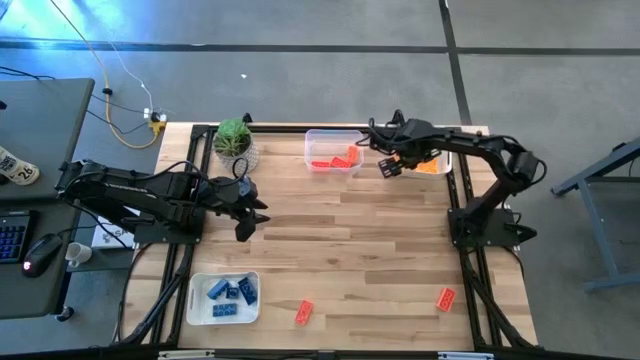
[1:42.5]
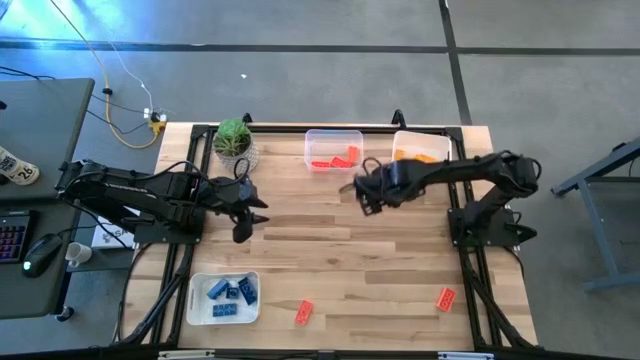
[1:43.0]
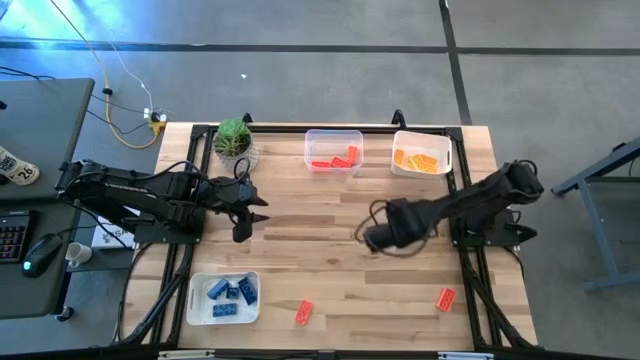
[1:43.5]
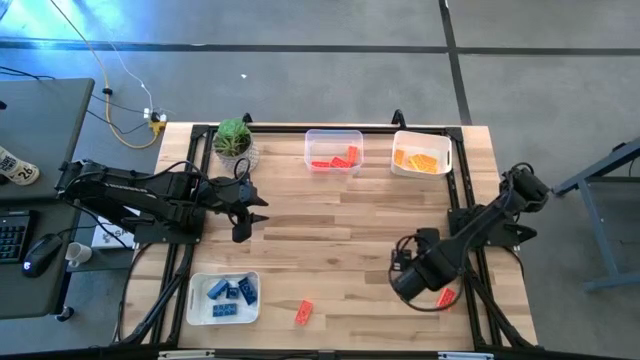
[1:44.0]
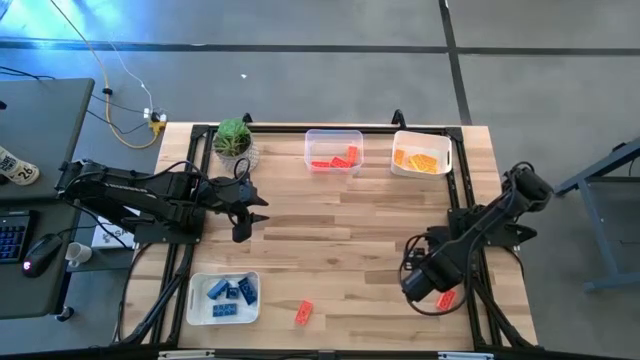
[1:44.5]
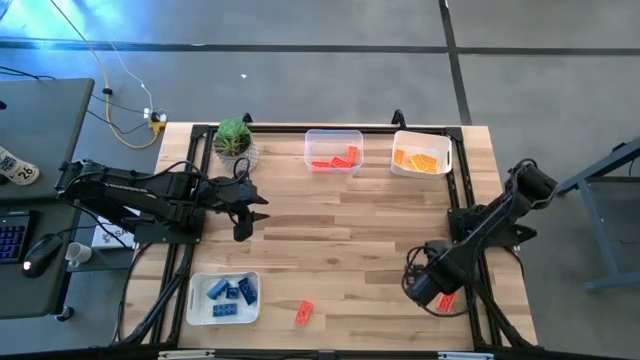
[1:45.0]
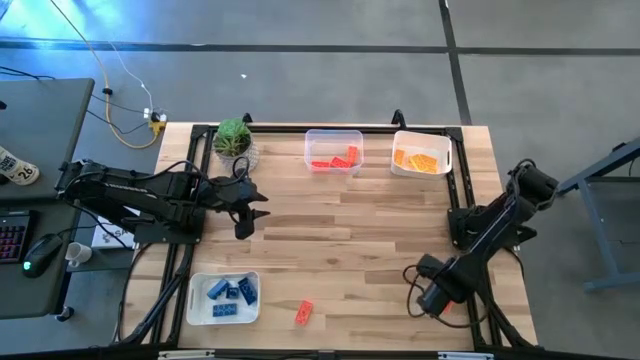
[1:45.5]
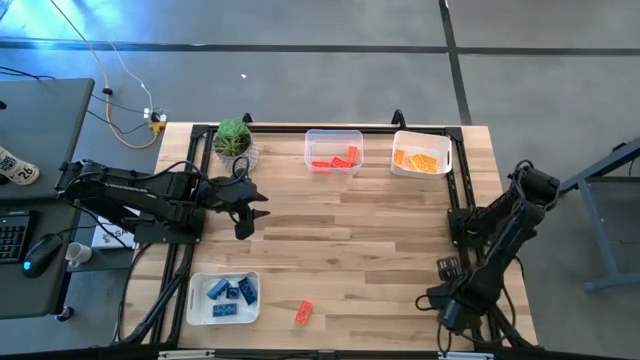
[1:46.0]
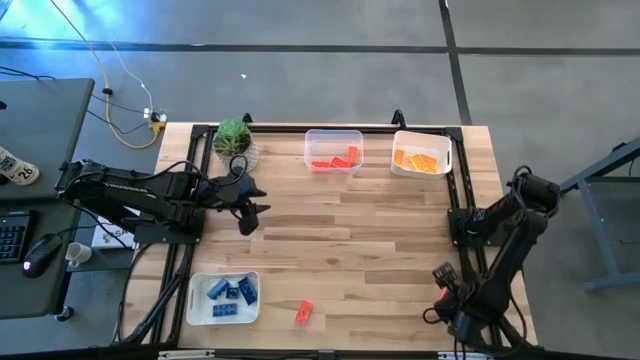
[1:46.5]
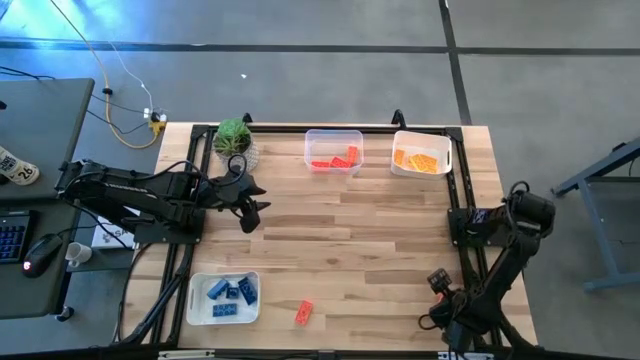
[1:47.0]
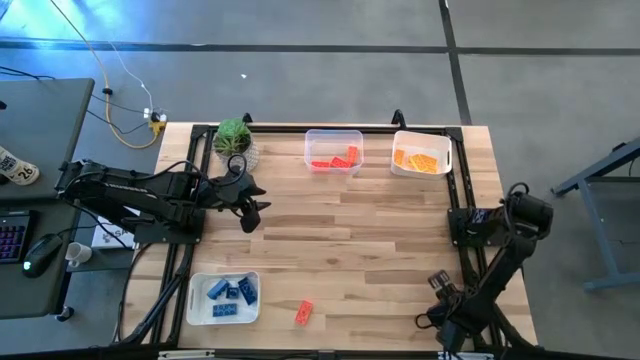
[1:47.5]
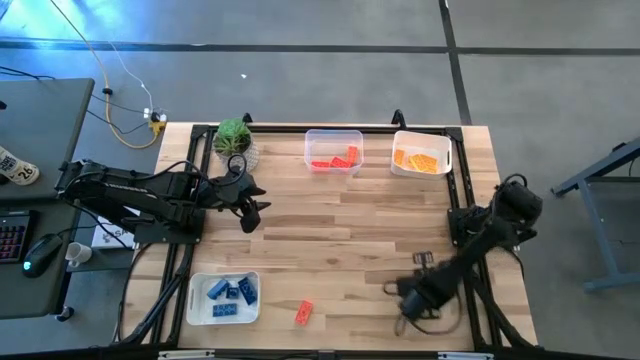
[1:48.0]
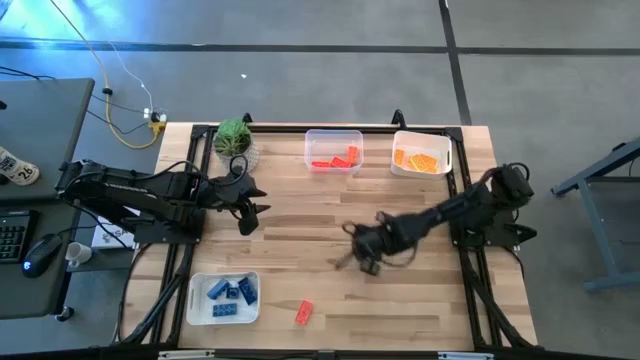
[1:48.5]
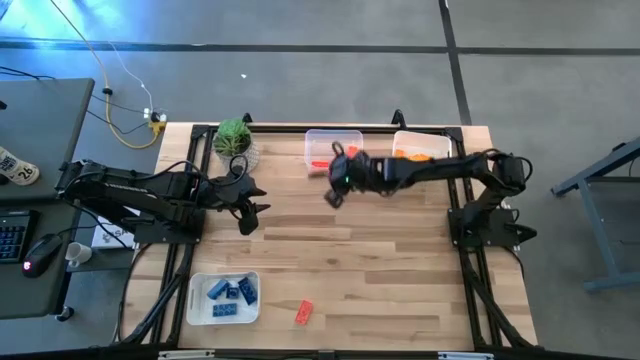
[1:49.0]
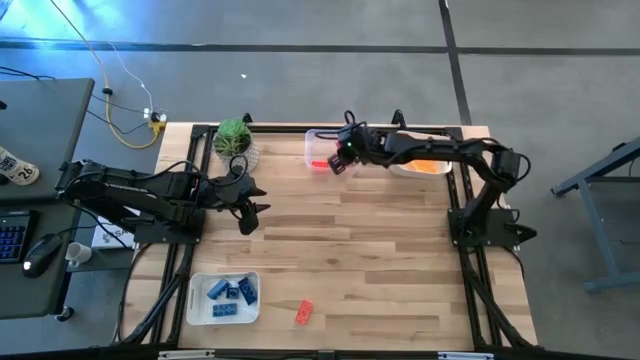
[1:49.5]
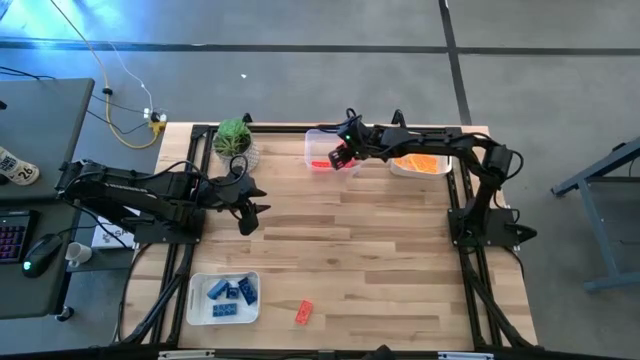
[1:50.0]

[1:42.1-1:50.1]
Task: Sort & place blocks by color
Put the orange game piece into the transparent bin

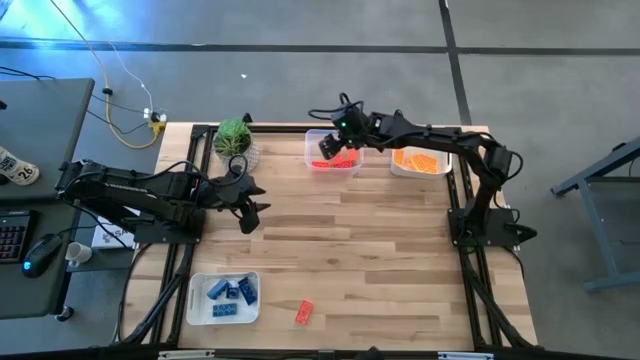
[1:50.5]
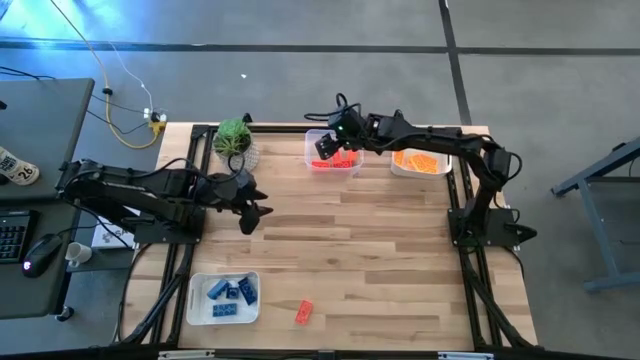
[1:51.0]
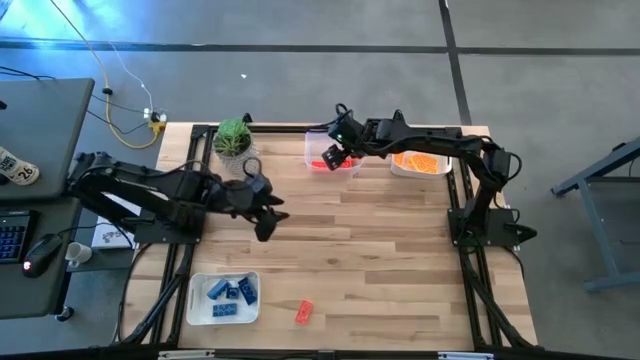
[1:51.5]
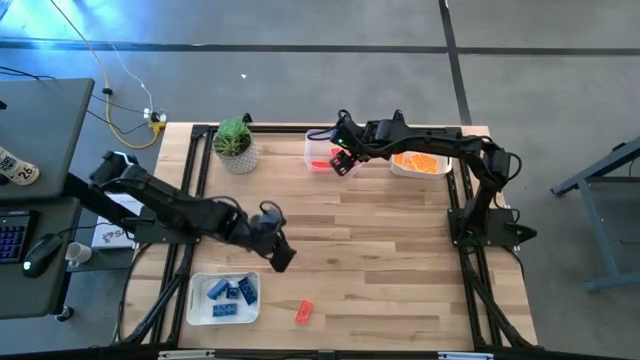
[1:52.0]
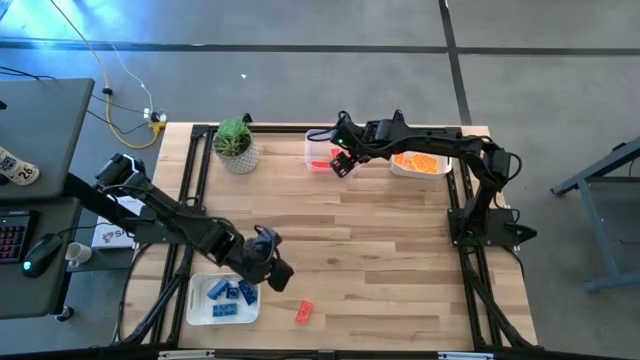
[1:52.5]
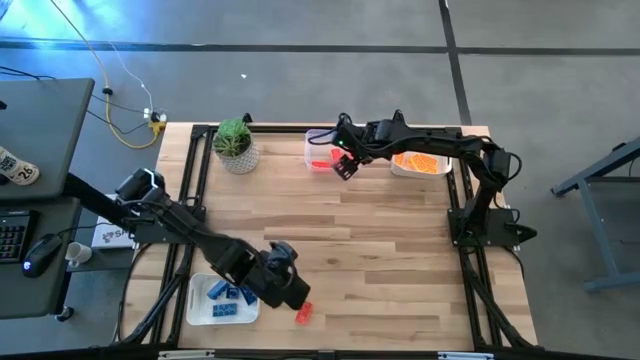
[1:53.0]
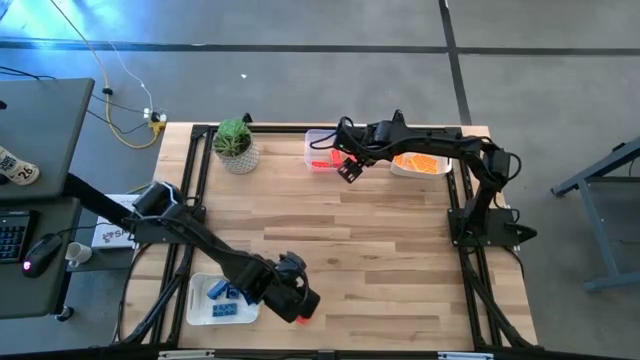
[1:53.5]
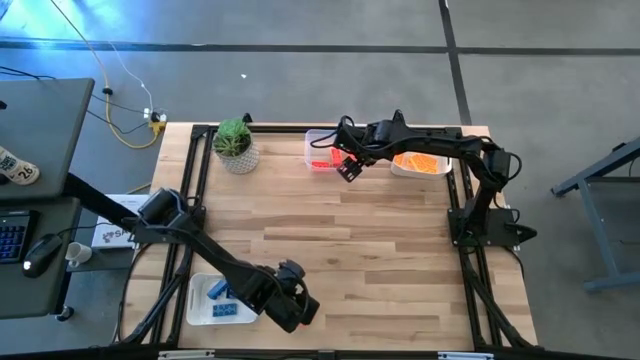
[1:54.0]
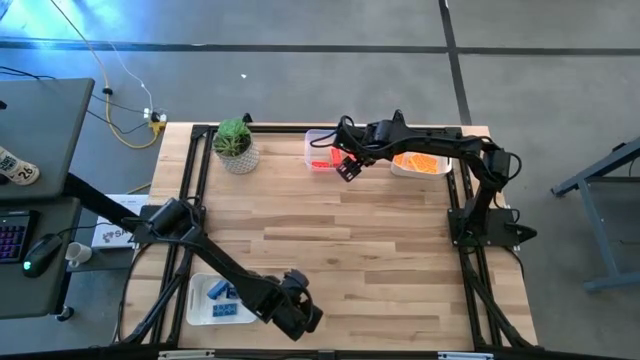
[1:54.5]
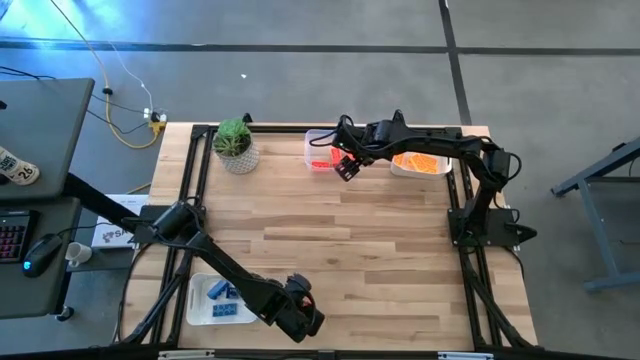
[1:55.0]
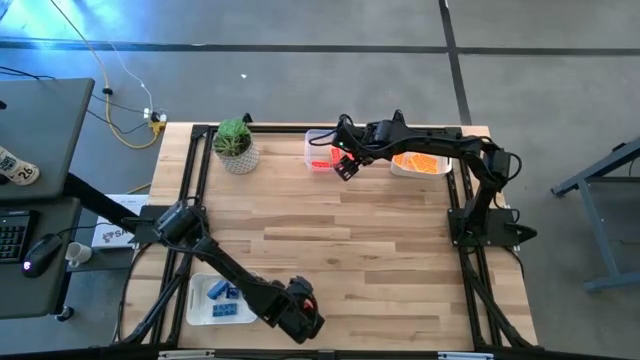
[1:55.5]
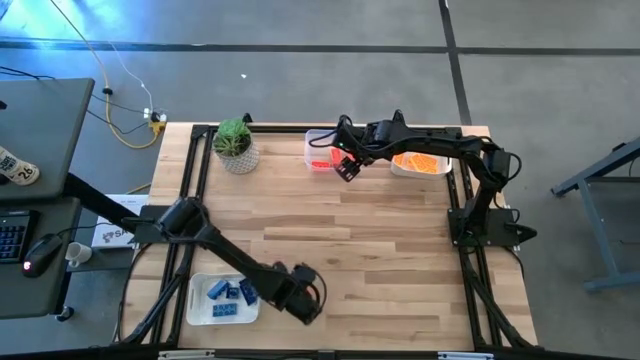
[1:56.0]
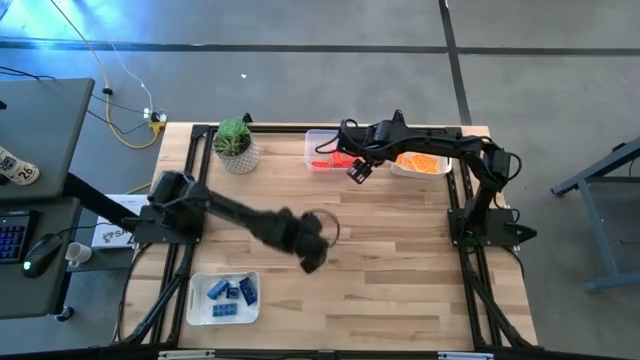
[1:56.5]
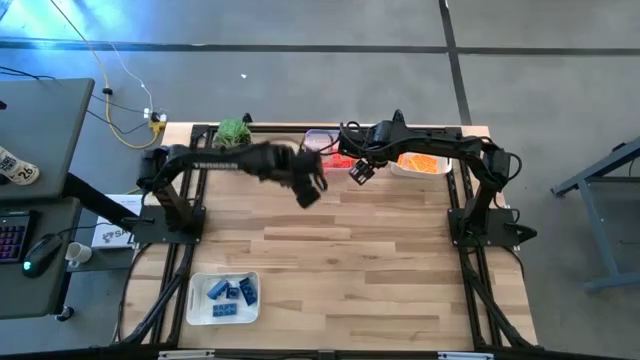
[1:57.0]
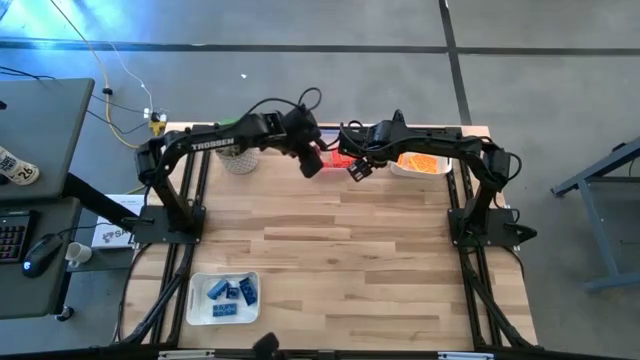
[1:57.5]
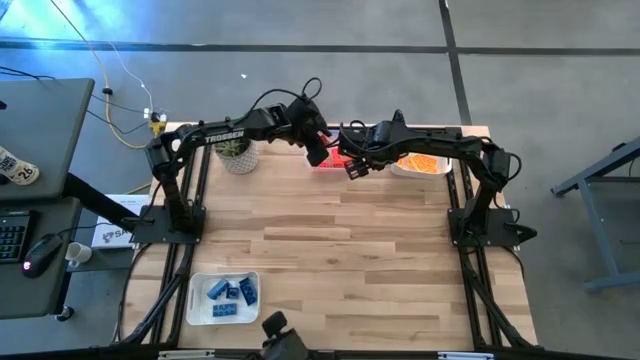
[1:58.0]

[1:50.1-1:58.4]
Put the orange game piece into the transparent bin

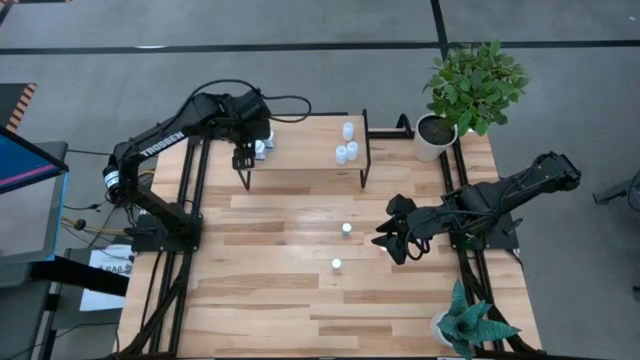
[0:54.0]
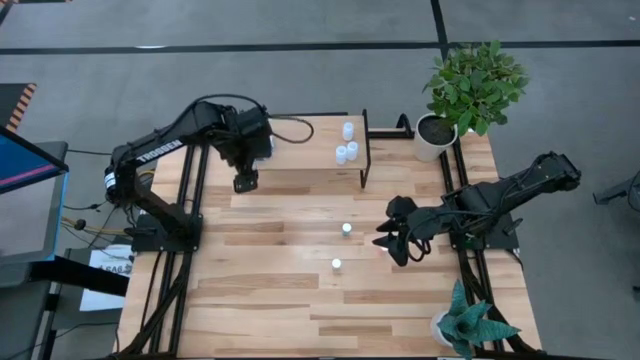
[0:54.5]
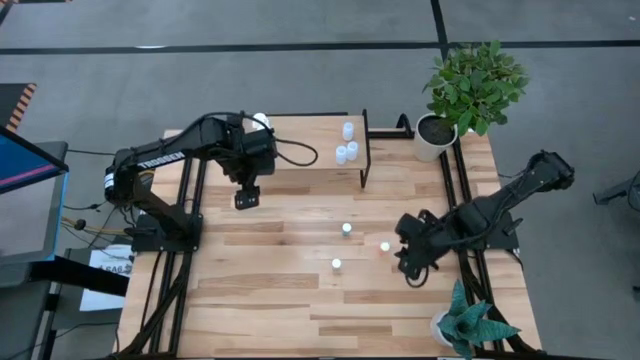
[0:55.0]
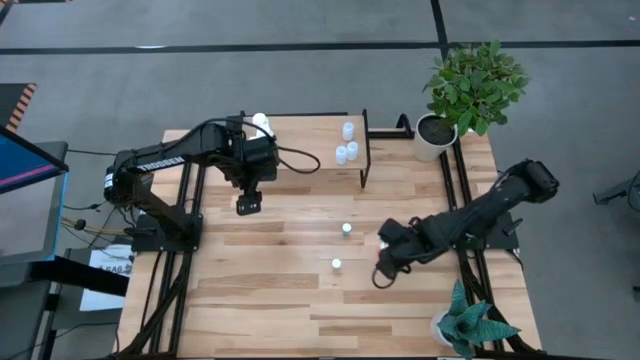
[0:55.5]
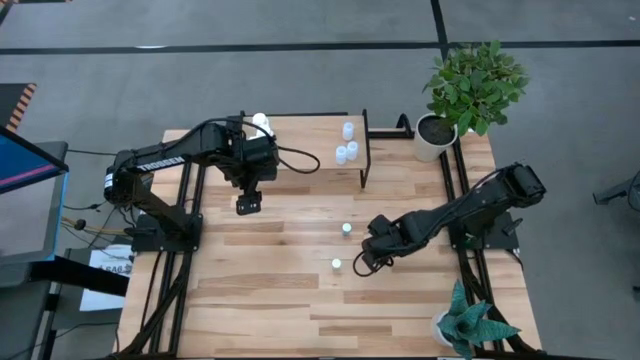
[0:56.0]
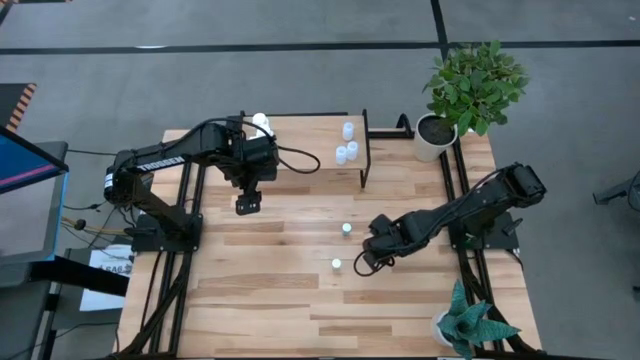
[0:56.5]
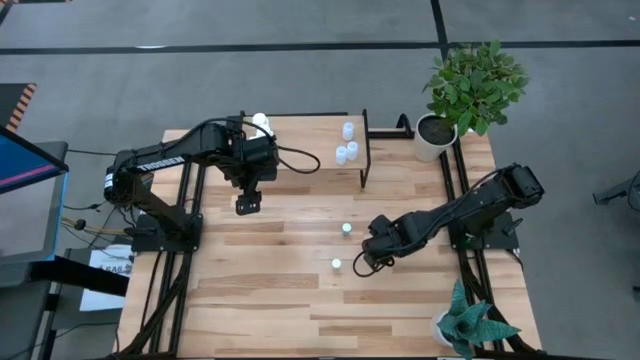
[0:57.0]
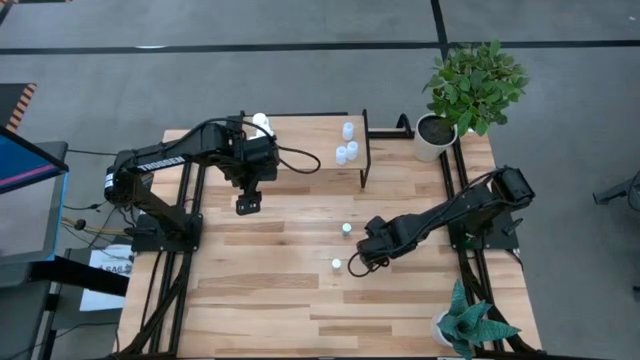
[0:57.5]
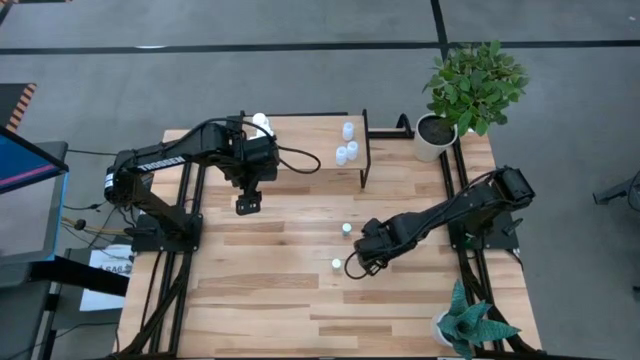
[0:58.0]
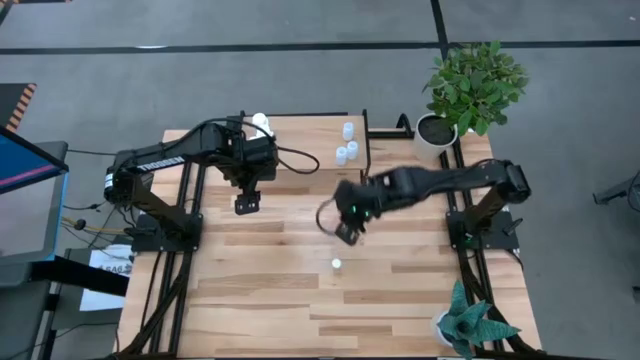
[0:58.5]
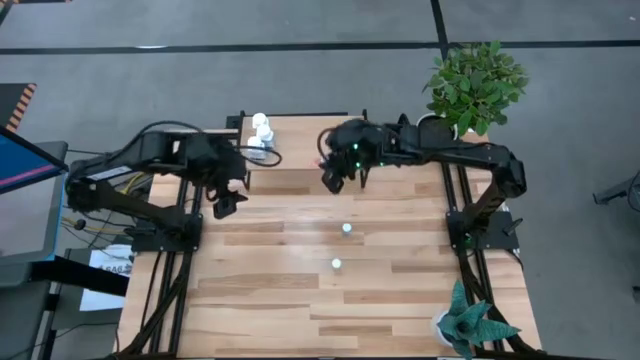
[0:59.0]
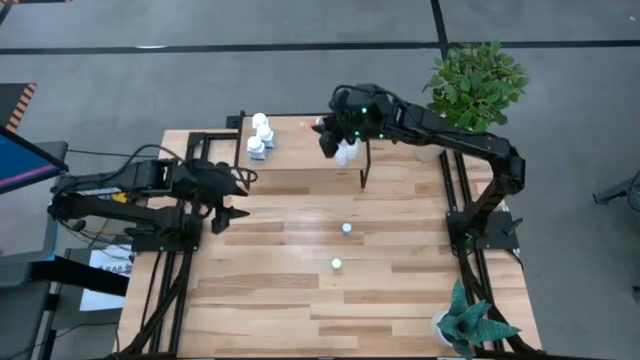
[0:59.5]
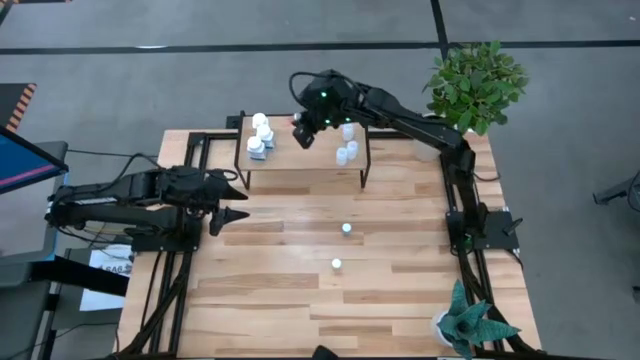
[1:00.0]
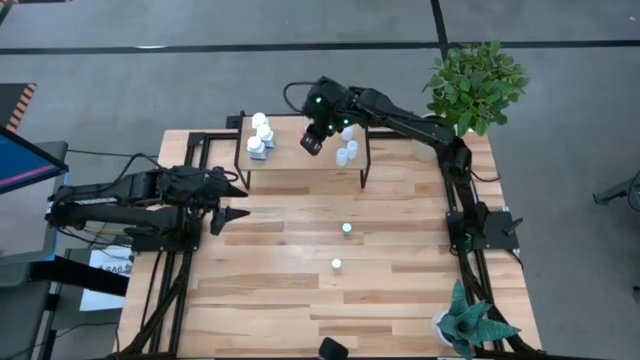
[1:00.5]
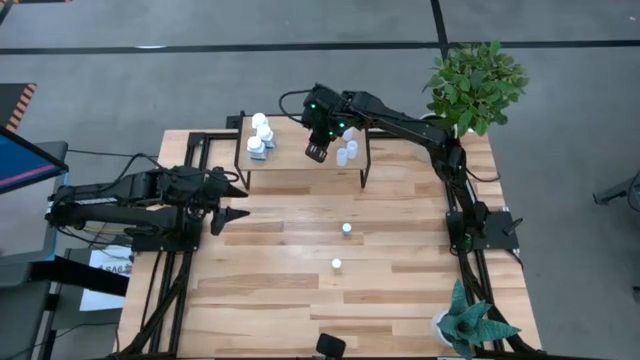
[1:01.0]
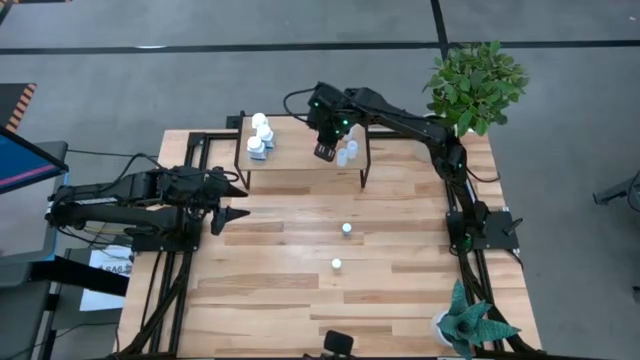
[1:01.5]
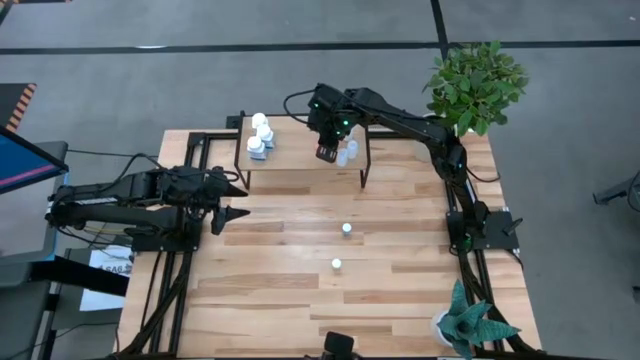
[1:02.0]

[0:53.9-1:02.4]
Task: Pick and place medicine bottles onto shelf by color
Put the red medicine bottle on the shelf
